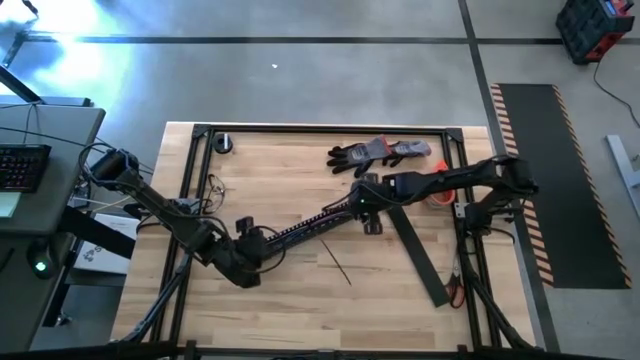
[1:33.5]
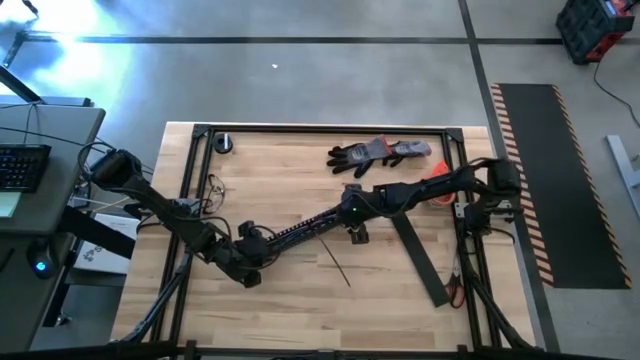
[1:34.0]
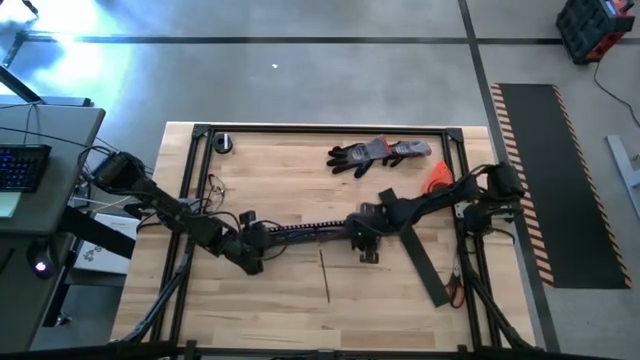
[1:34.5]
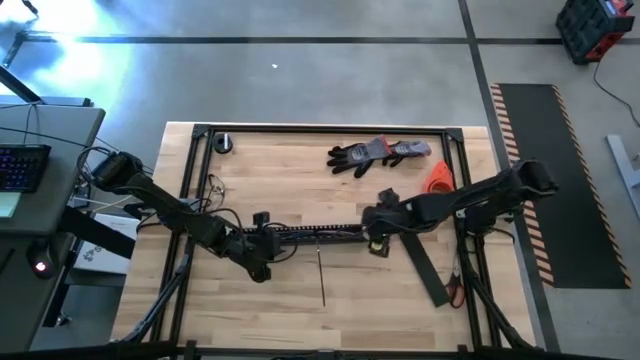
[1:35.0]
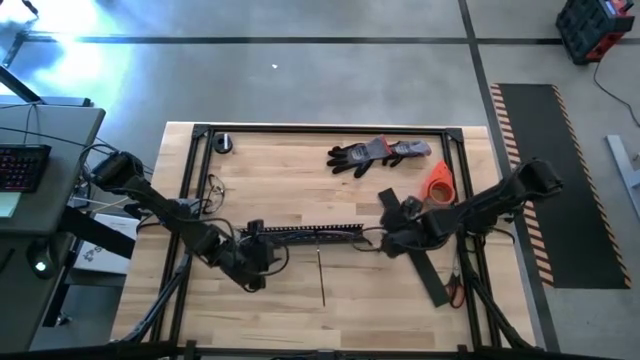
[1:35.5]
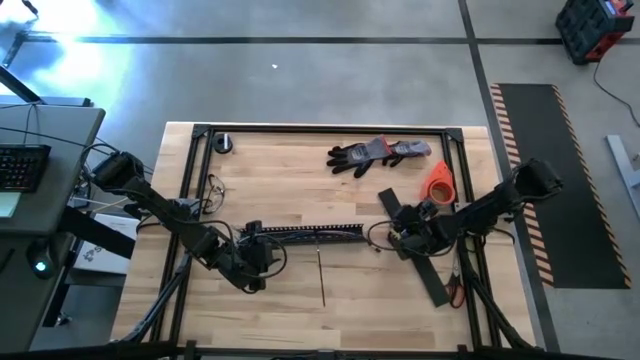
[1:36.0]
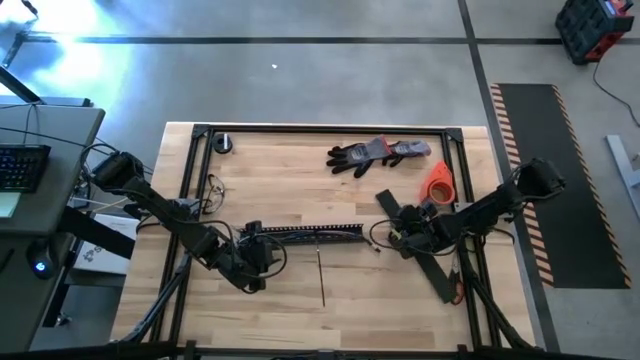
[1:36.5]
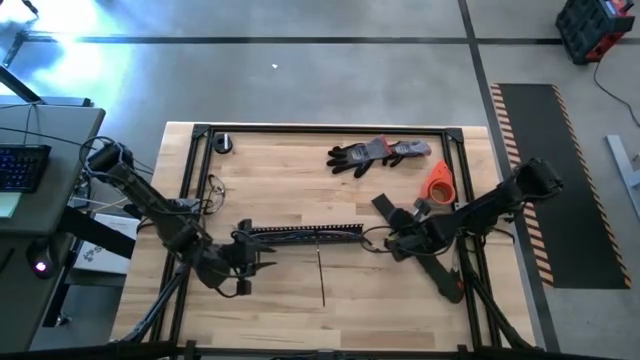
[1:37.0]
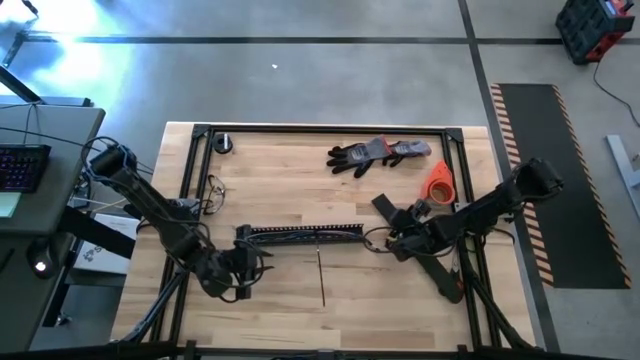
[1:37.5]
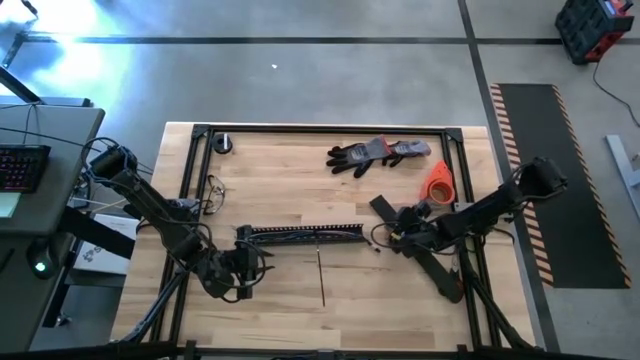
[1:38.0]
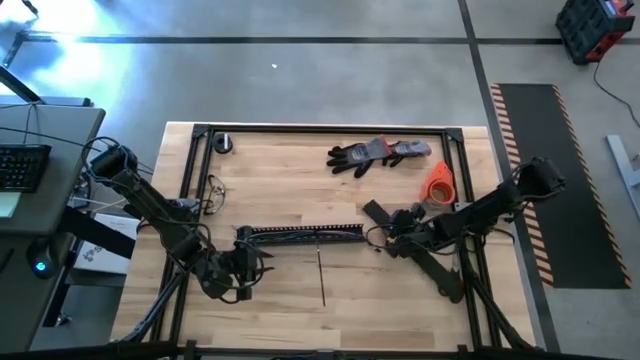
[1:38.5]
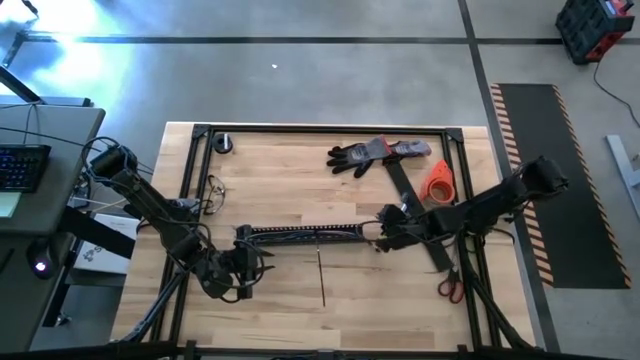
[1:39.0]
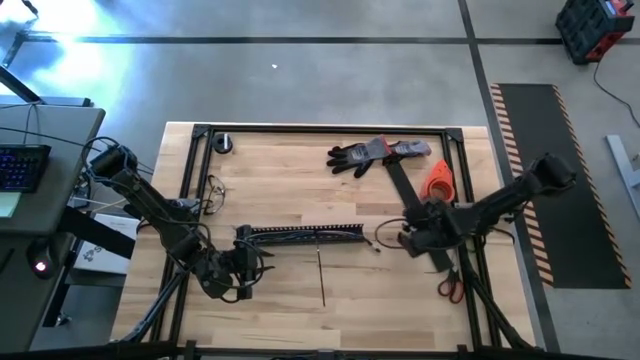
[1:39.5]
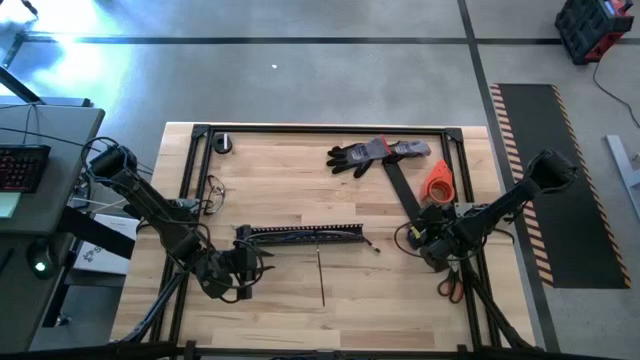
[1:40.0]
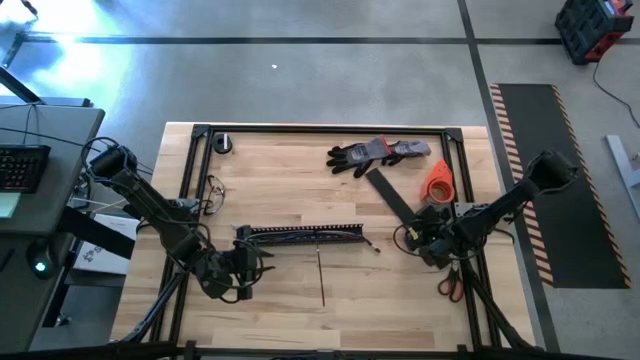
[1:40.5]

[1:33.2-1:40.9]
Task: Ziptie cables
Close the black cable with the black cable duct cover

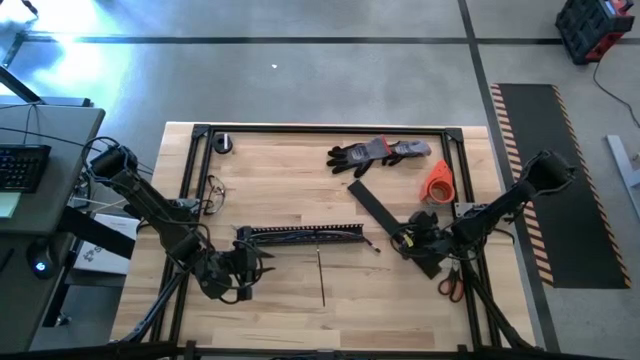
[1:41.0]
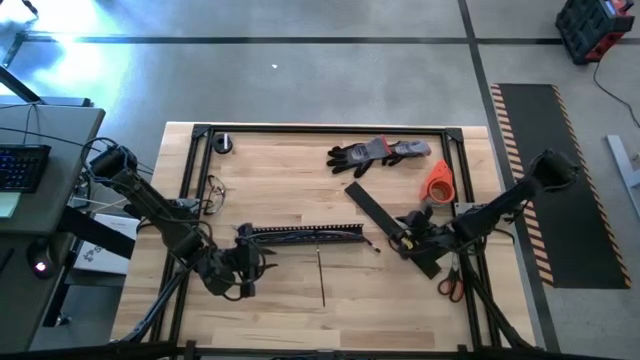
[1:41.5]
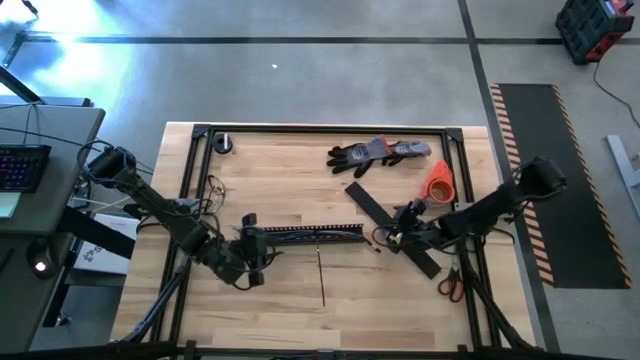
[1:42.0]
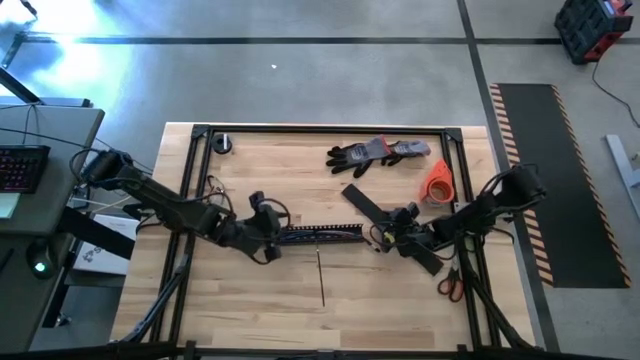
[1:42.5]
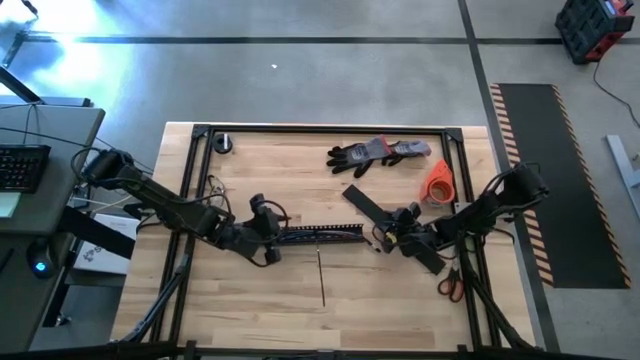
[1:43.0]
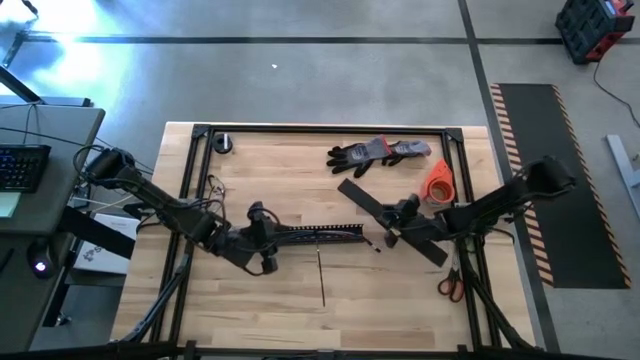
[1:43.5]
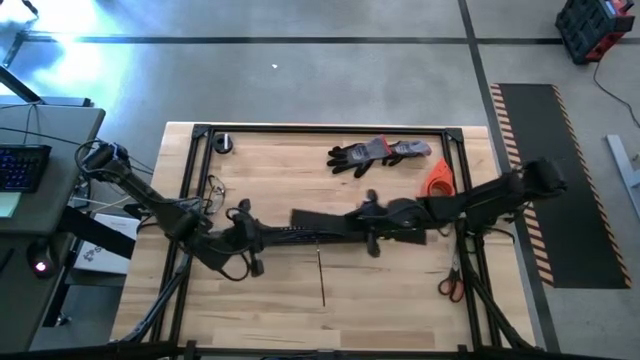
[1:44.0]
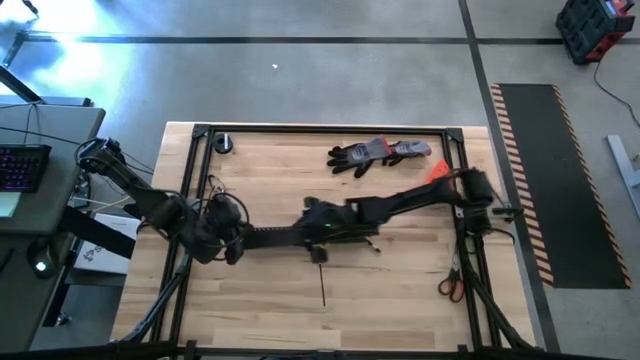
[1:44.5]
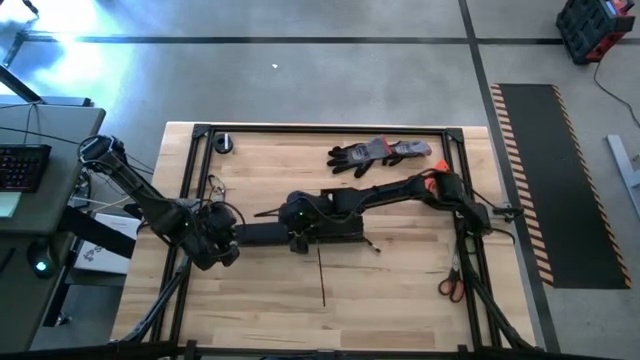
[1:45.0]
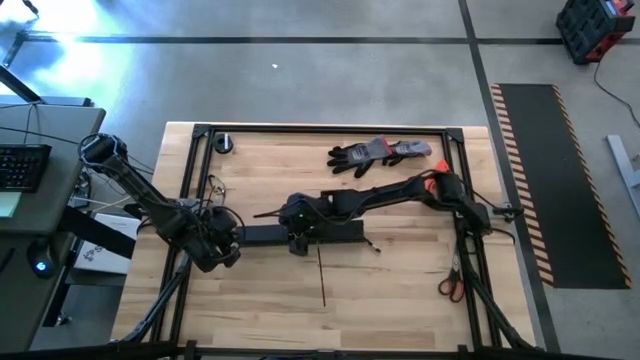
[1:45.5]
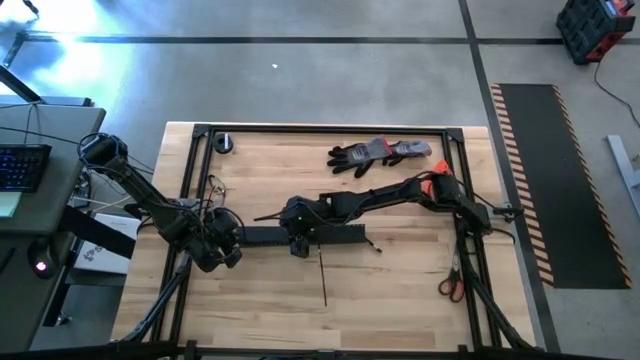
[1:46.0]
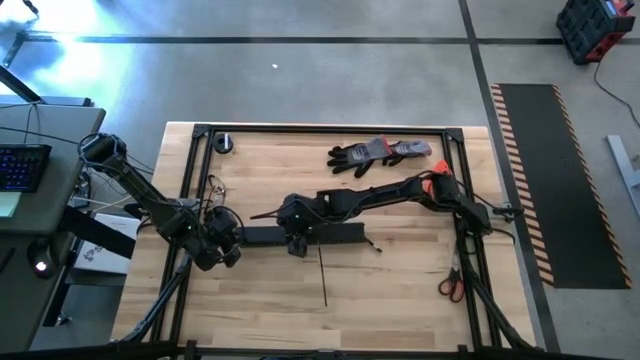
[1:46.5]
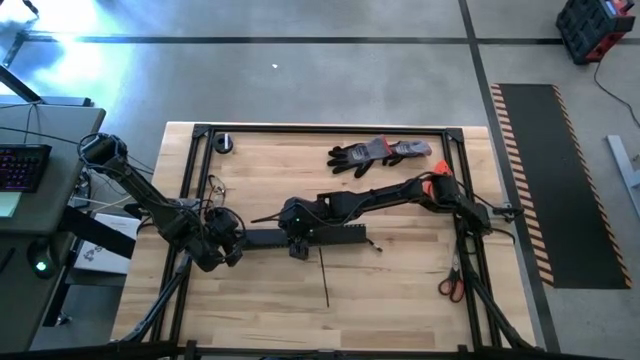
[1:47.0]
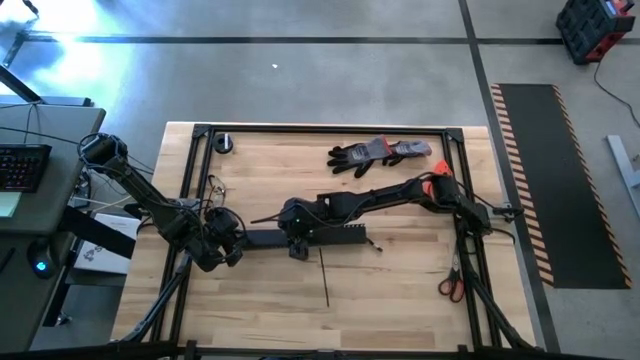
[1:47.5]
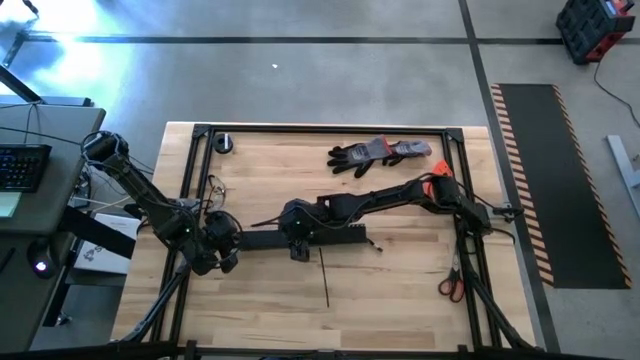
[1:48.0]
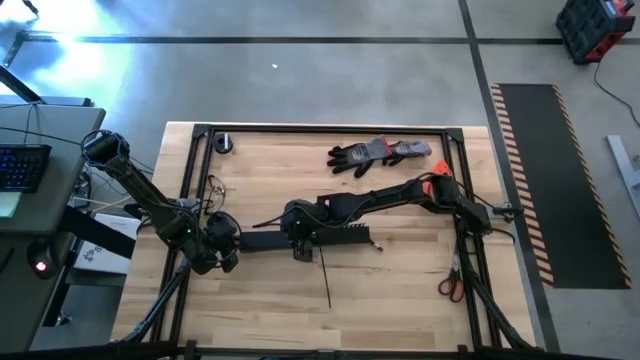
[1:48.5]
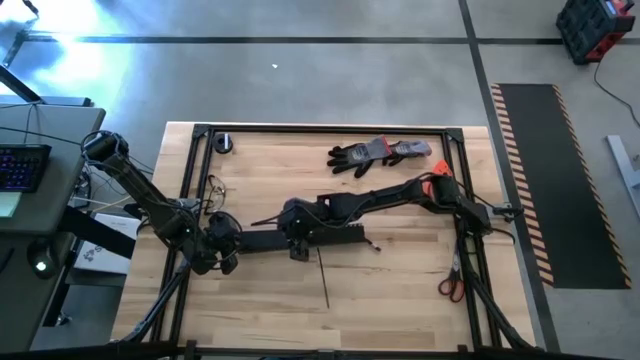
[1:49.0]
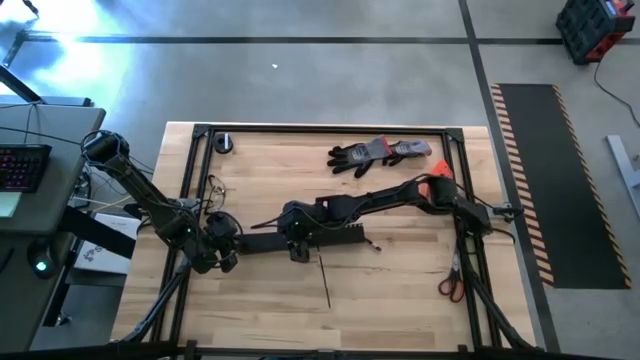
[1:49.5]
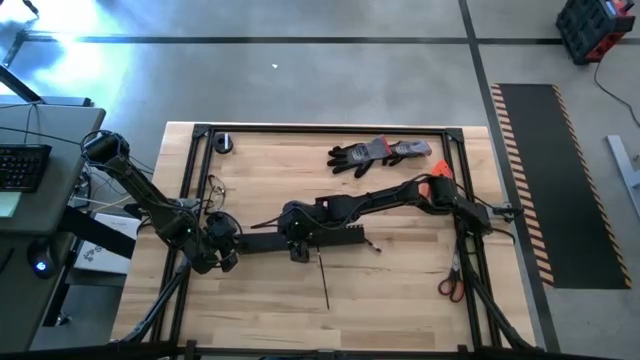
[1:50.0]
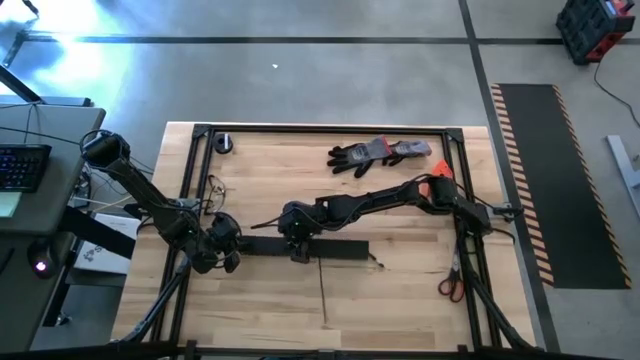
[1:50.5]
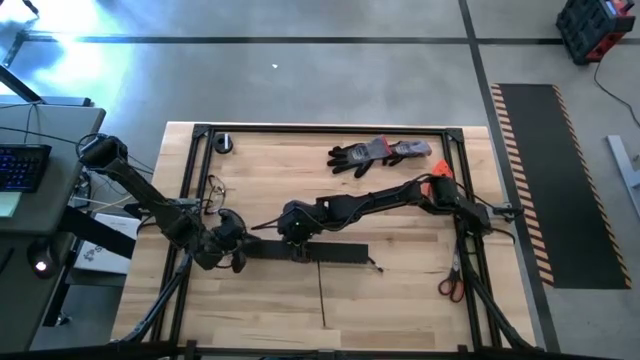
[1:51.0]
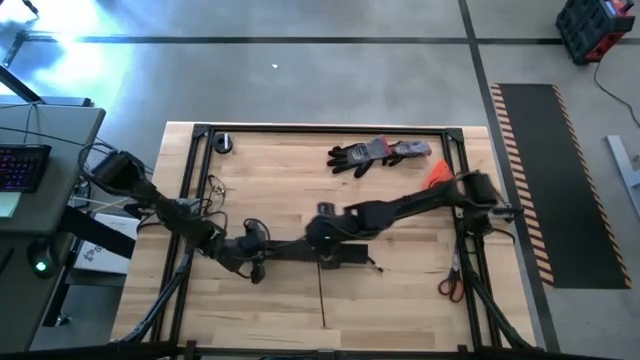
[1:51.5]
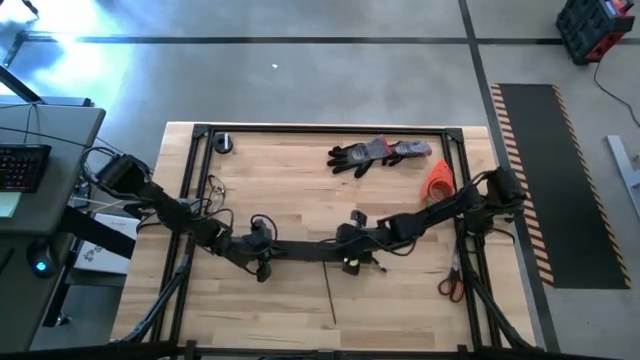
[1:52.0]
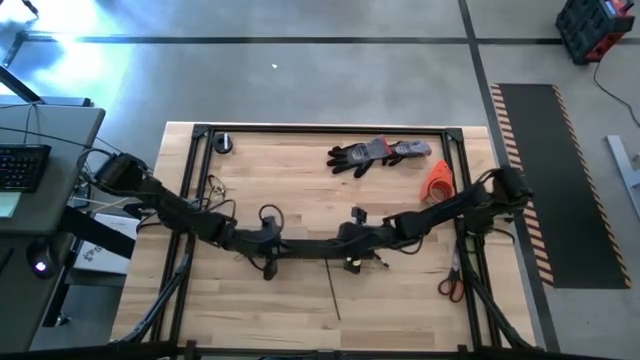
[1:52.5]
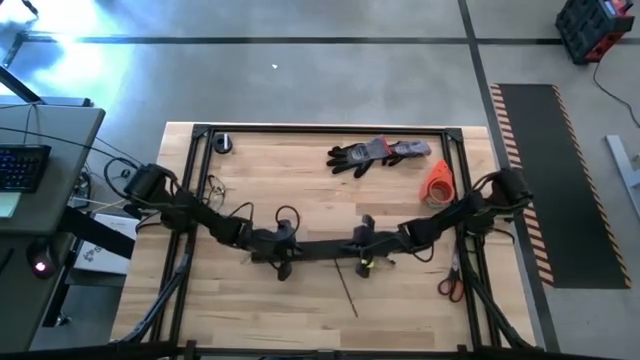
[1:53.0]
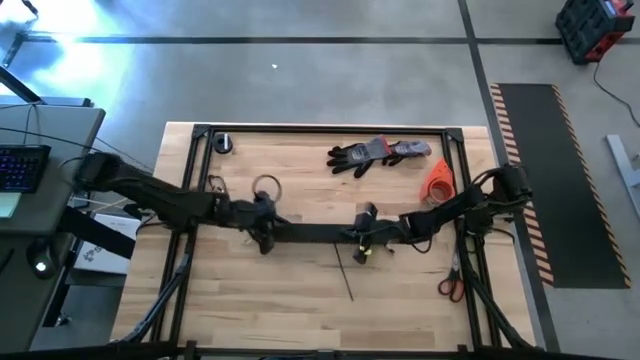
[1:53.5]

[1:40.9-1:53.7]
Close the black cable with the black cable duct cover
